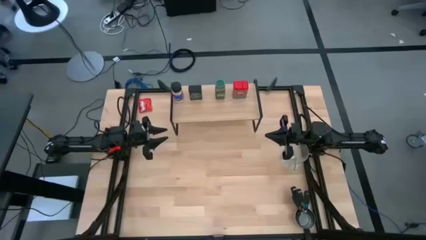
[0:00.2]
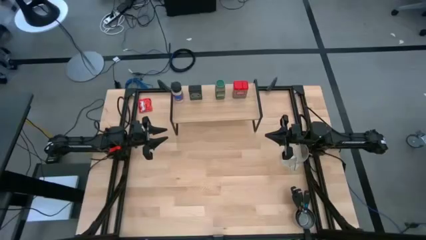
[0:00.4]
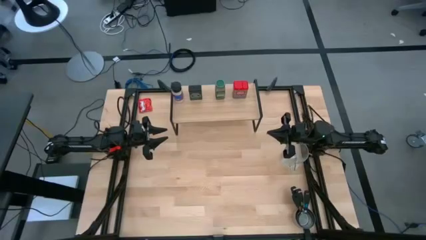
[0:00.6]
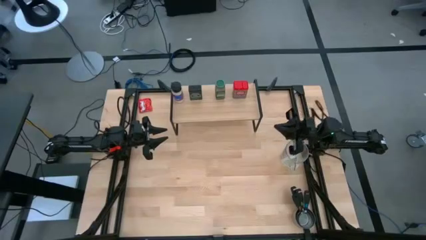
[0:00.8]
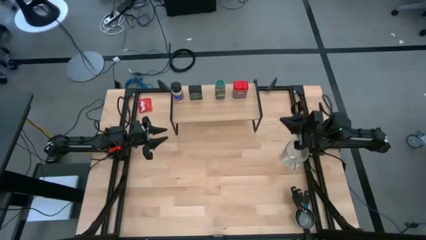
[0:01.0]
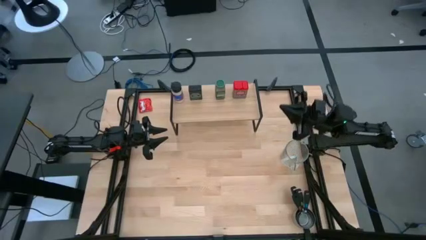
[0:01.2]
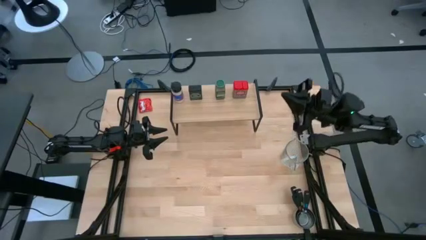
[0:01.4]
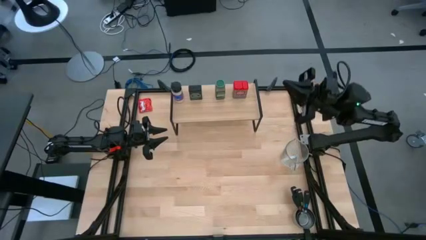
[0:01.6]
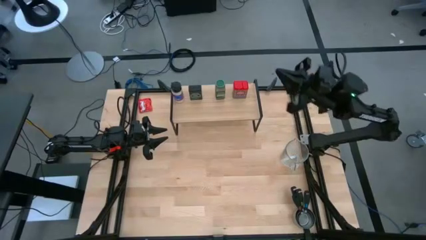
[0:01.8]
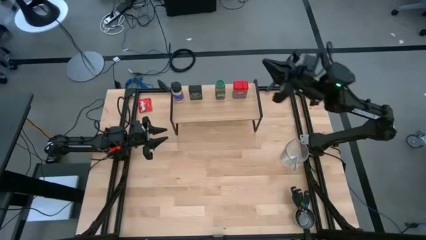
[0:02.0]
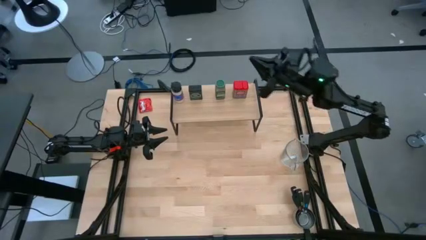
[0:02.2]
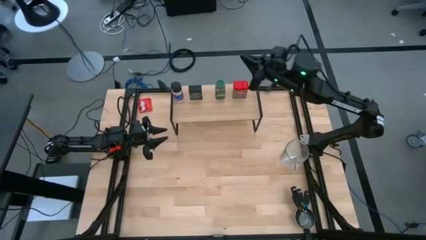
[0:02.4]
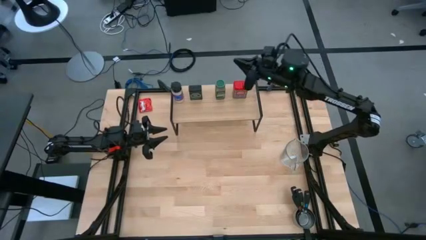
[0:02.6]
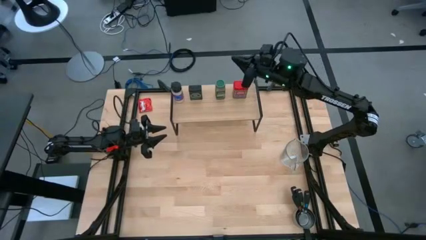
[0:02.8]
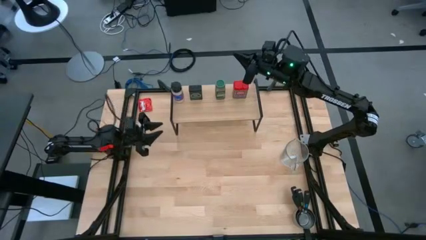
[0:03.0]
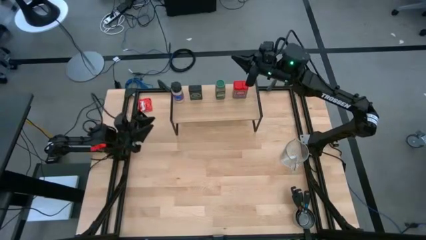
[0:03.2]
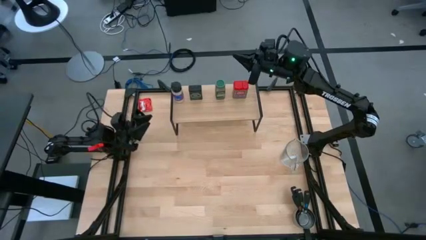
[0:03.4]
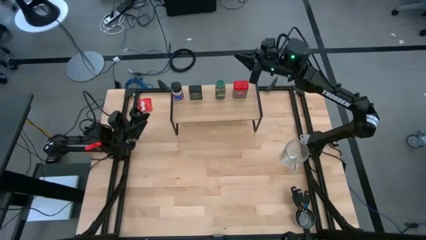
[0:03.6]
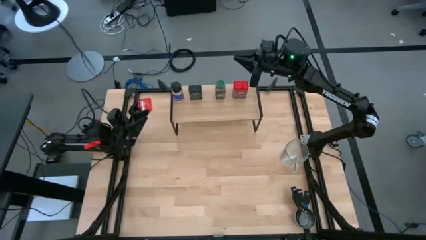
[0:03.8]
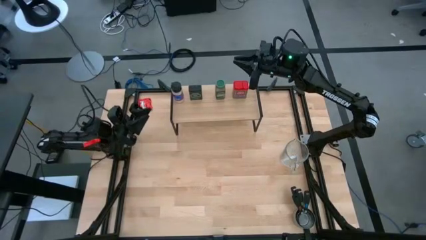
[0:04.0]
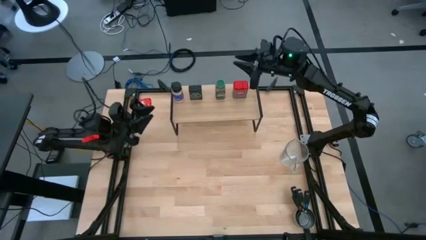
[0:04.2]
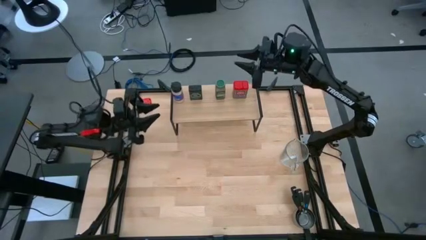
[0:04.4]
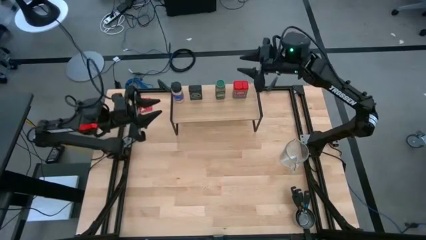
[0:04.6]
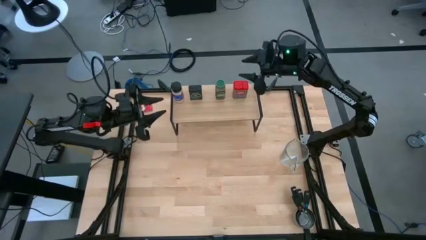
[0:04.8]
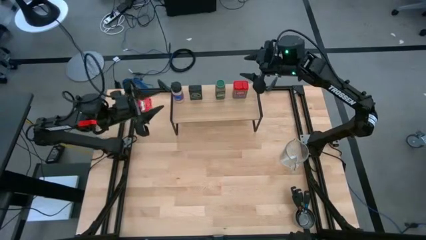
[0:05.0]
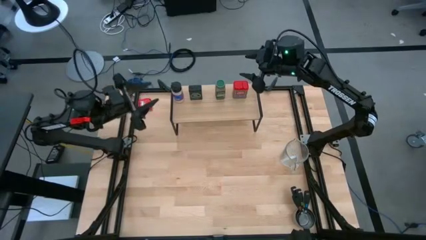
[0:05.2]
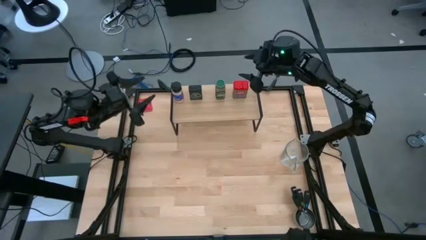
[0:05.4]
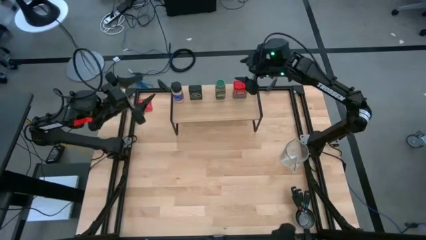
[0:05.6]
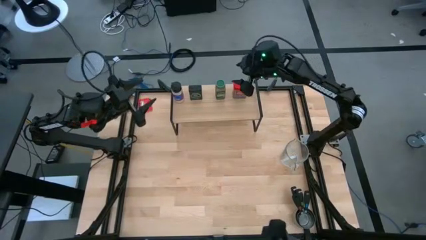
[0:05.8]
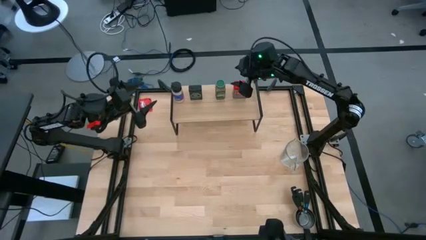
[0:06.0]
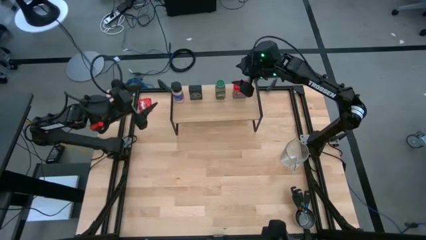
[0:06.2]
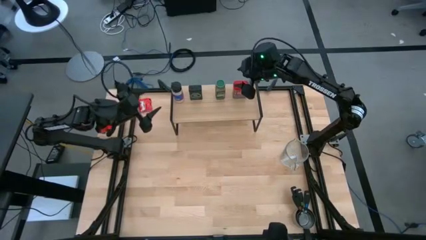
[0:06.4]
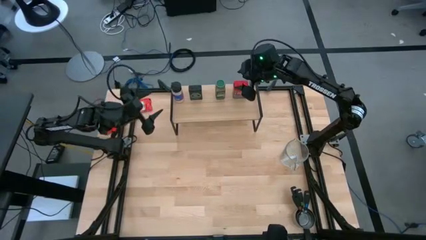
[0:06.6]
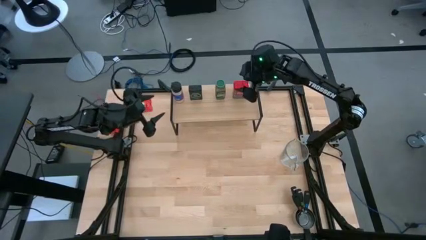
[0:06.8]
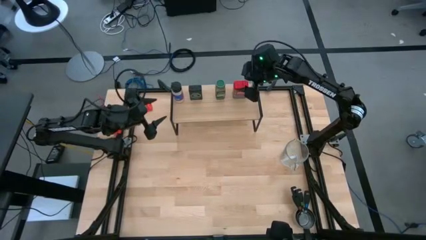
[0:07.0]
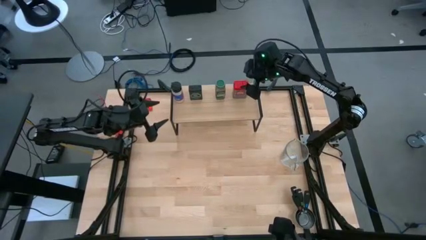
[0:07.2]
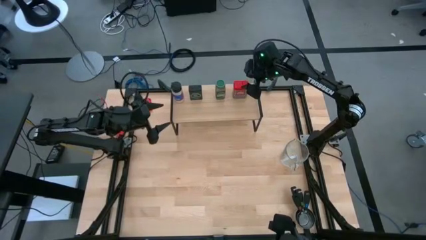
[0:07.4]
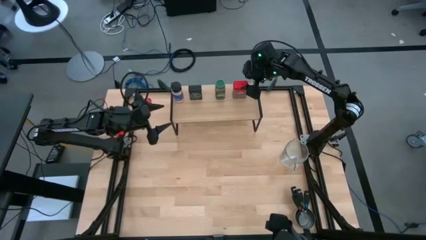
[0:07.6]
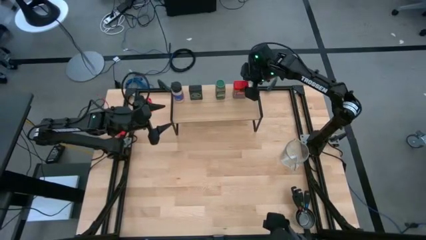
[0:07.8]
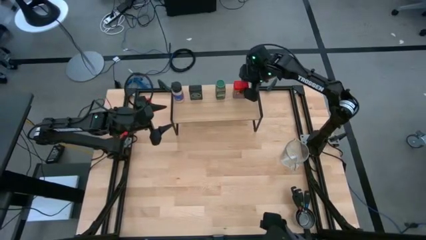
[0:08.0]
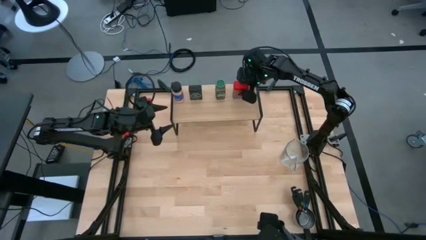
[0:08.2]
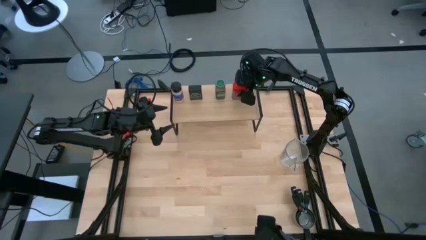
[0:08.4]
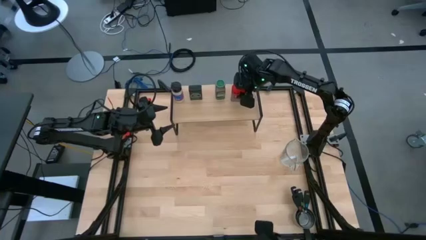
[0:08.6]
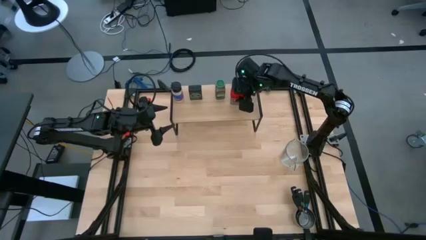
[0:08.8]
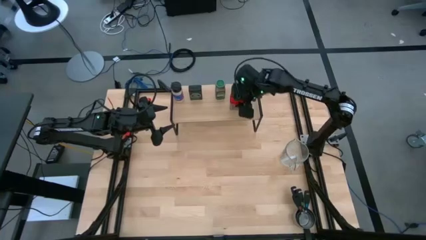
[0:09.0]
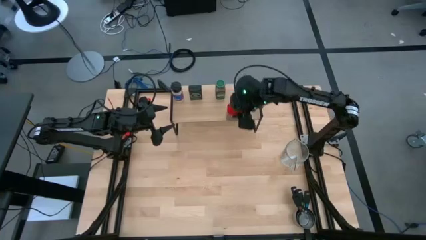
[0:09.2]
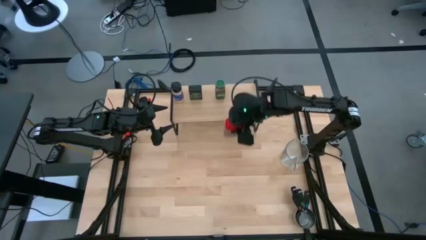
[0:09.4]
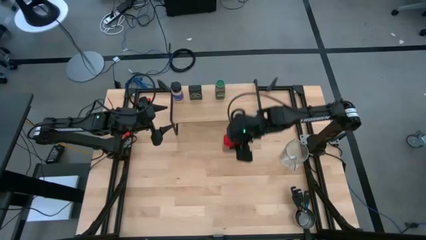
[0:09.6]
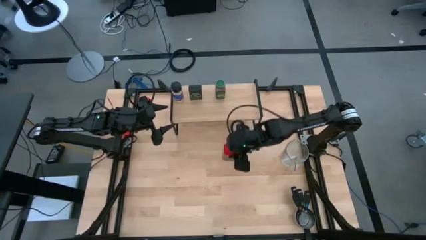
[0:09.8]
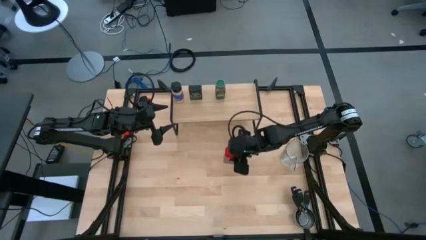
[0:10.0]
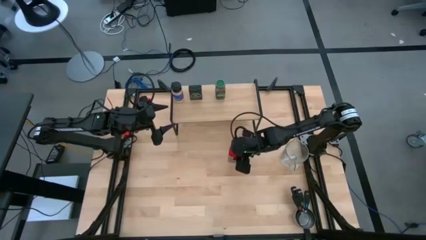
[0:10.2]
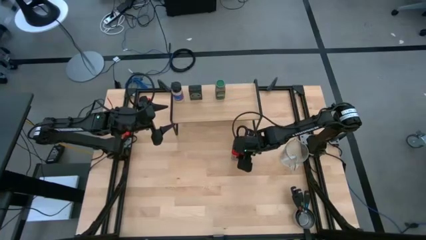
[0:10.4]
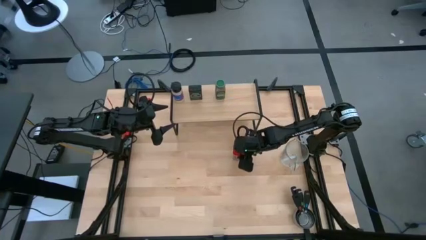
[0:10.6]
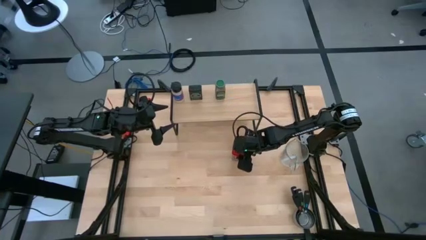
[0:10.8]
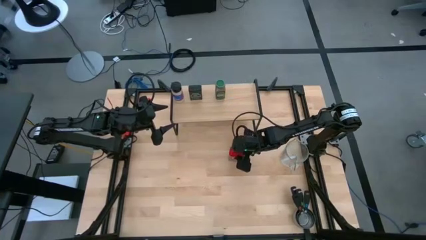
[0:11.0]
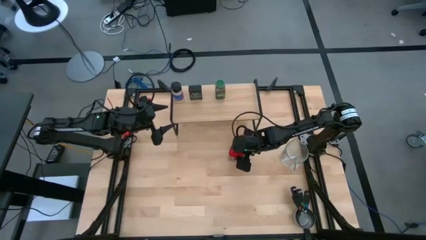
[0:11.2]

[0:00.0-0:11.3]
Task: Shelf spices
Remove the red seasoning can from the shelf

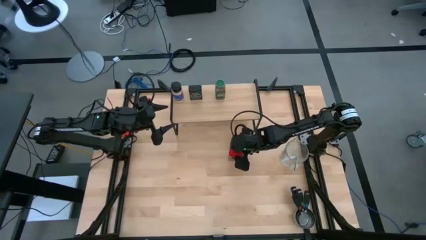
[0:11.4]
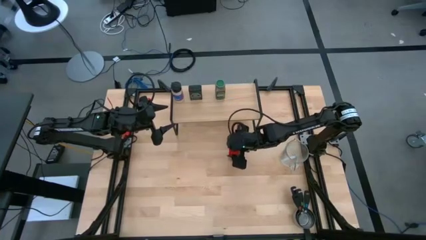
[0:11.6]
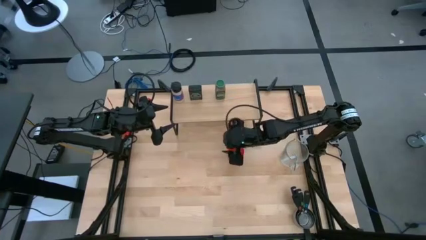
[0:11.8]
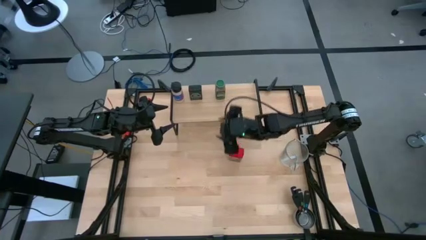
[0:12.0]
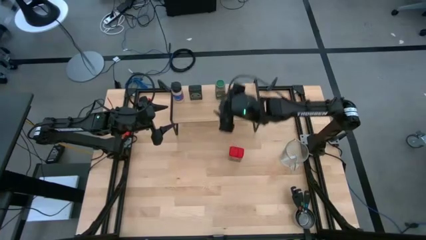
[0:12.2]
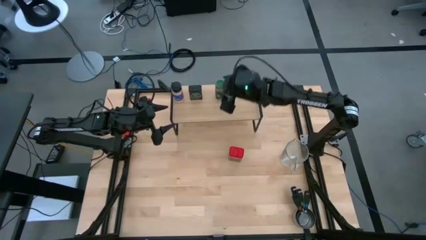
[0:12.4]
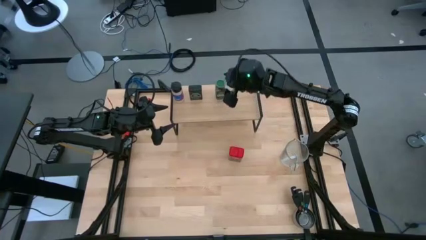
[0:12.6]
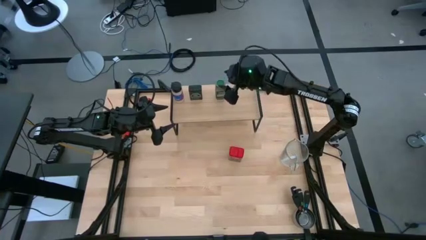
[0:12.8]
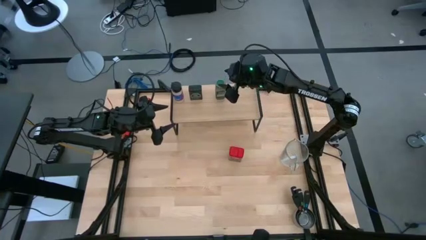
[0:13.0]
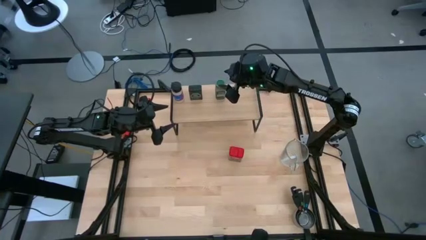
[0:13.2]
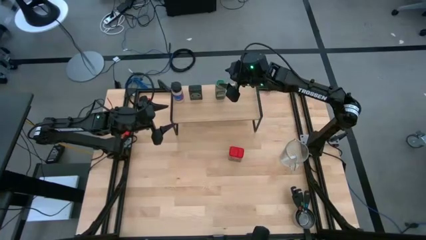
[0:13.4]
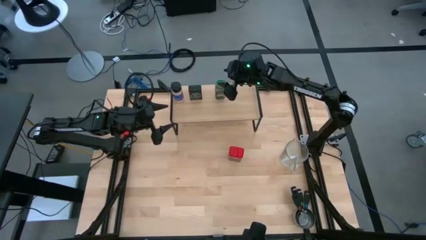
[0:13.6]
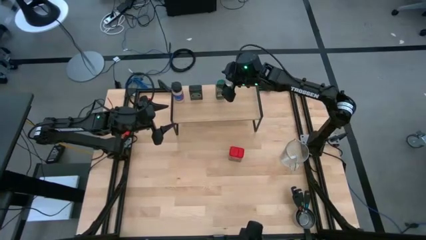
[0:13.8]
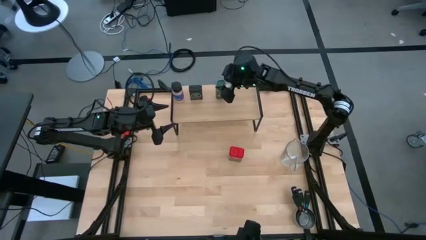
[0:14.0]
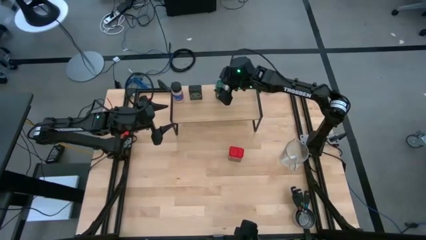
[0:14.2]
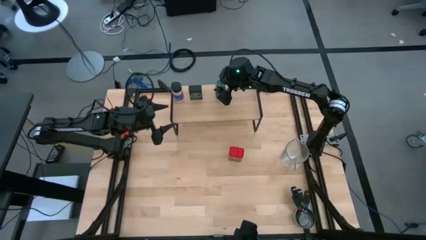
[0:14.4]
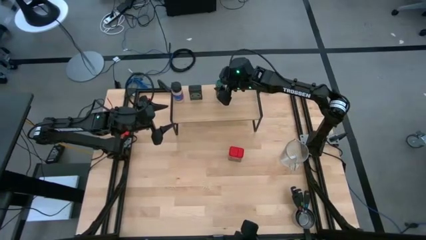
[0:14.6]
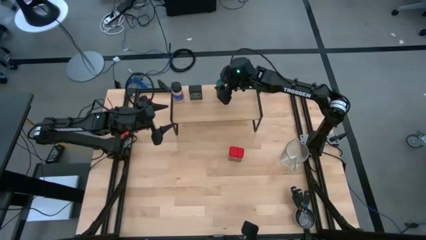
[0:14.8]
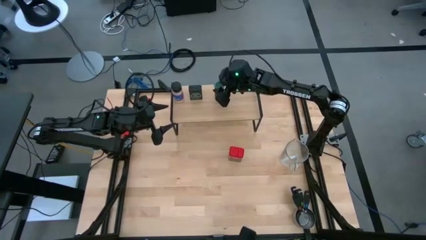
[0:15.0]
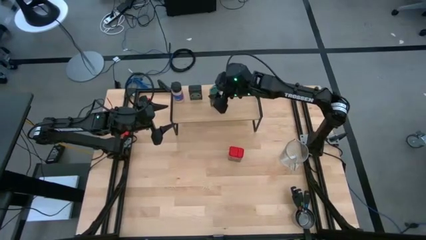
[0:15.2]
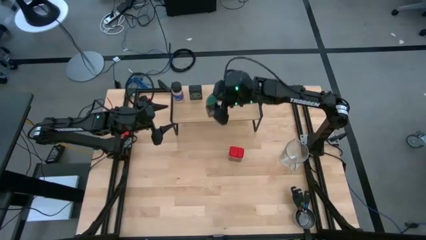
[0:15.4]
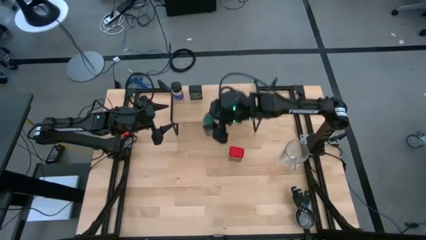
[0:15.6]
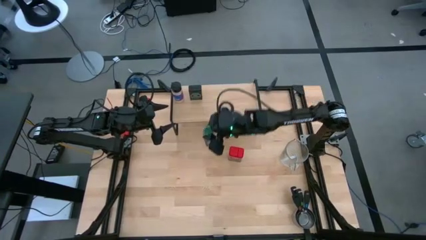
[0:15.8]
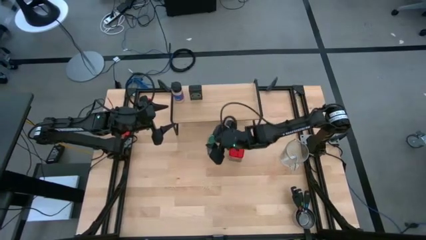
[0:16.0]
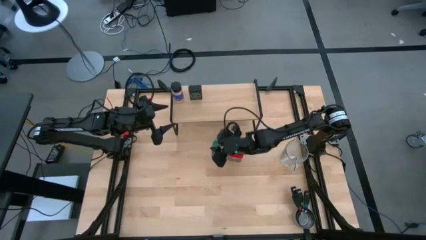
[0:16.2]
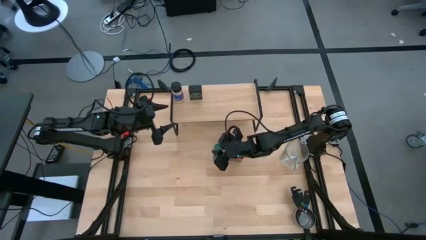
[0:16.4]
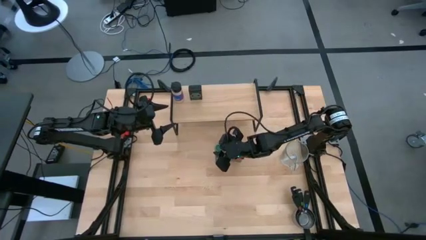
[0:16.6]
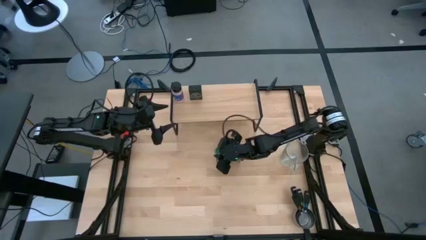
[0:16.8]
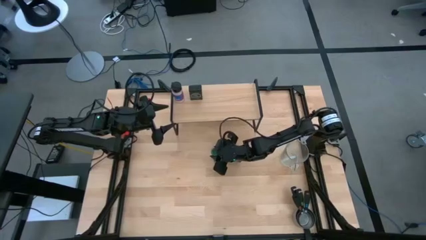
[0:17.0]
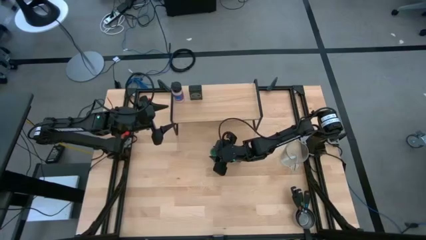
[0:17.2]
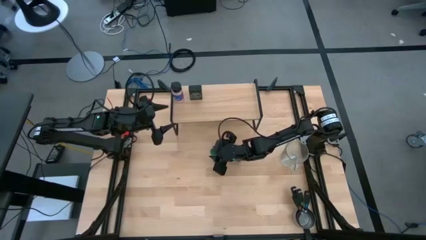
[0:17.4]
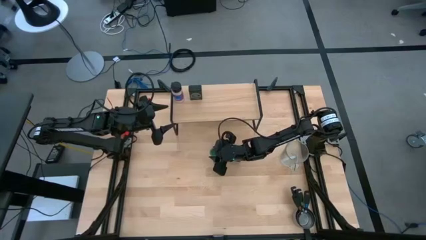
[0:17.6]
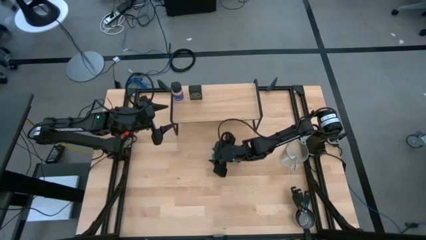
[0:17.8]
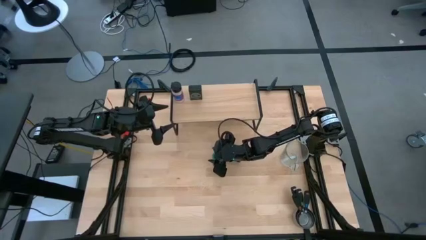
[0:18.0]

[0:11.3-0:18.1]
Remove the green seasoning bottle from the shelf
